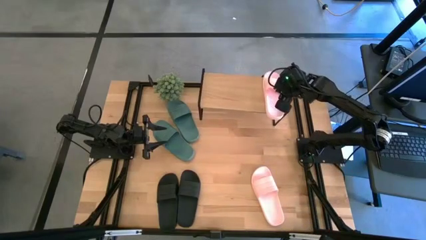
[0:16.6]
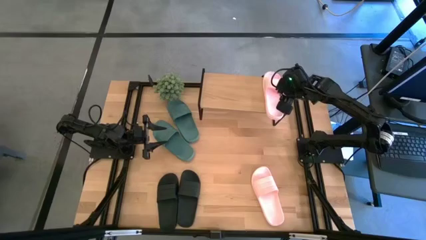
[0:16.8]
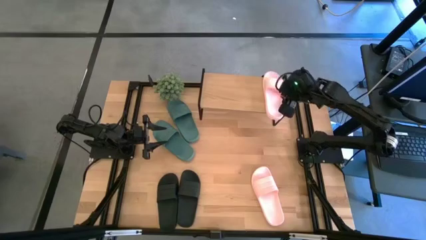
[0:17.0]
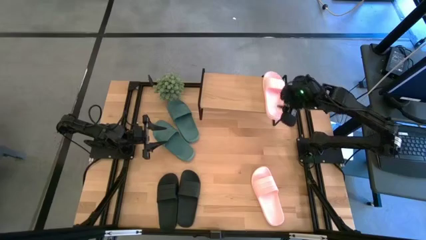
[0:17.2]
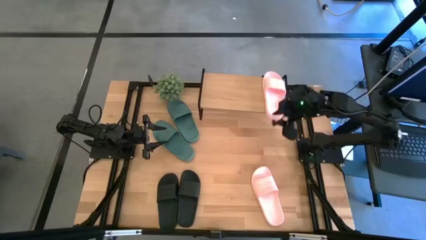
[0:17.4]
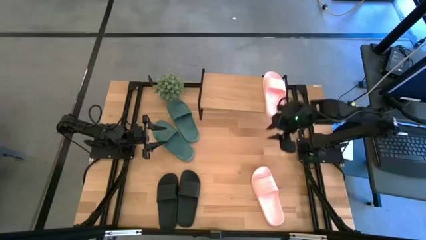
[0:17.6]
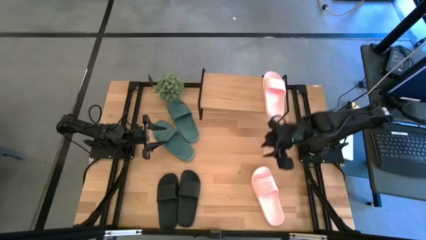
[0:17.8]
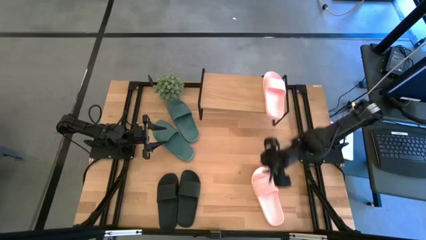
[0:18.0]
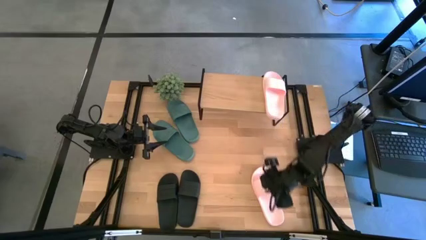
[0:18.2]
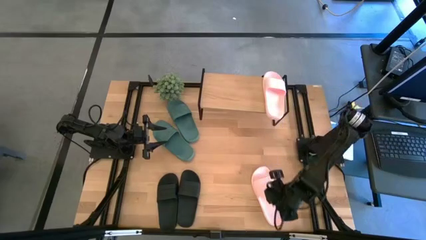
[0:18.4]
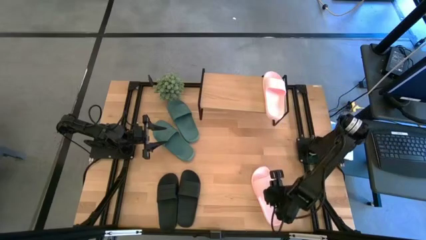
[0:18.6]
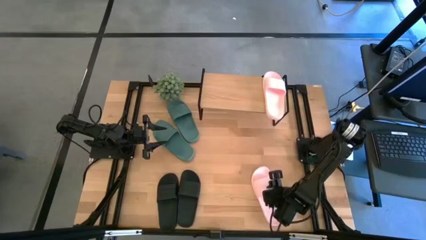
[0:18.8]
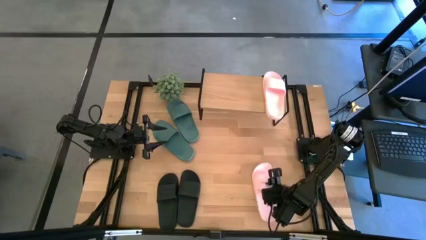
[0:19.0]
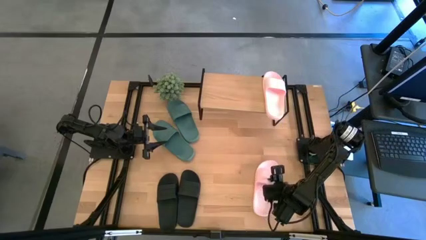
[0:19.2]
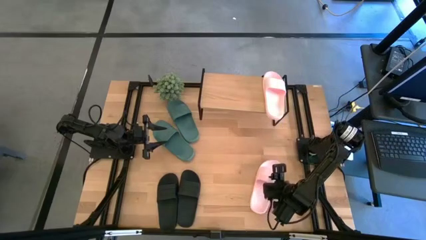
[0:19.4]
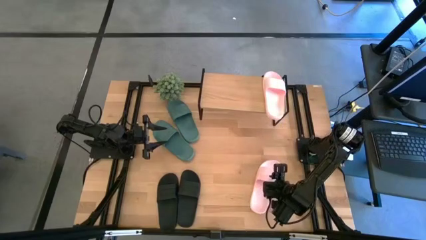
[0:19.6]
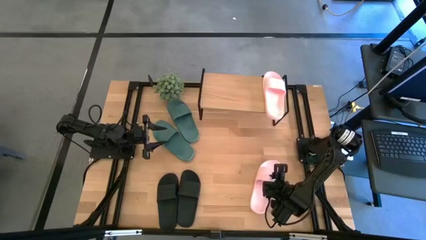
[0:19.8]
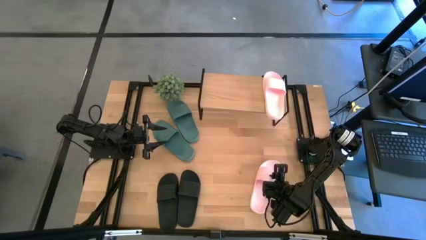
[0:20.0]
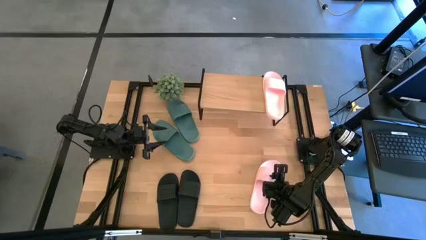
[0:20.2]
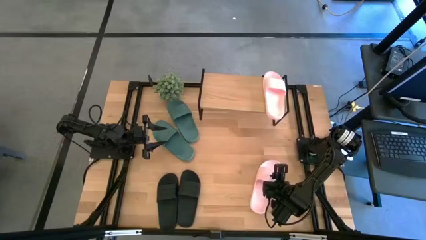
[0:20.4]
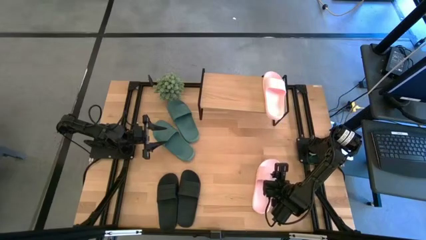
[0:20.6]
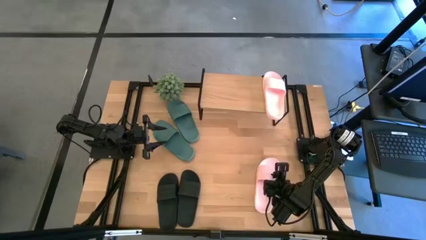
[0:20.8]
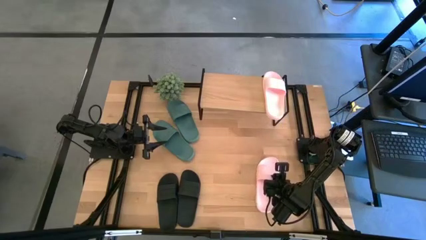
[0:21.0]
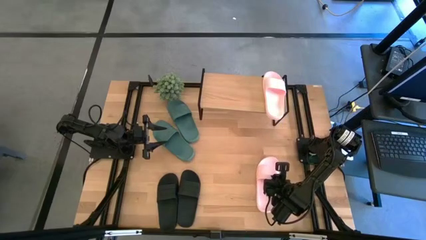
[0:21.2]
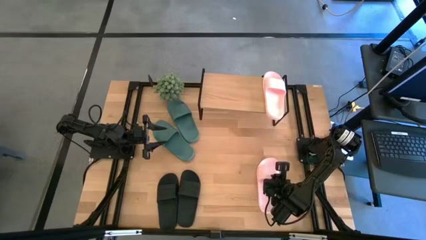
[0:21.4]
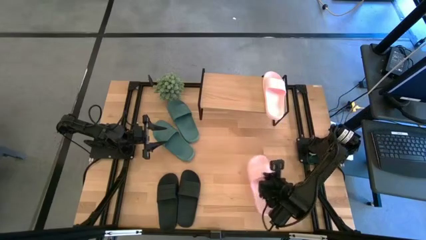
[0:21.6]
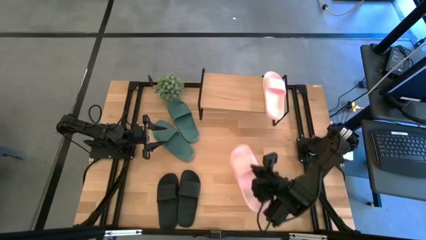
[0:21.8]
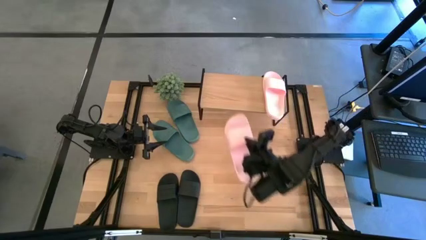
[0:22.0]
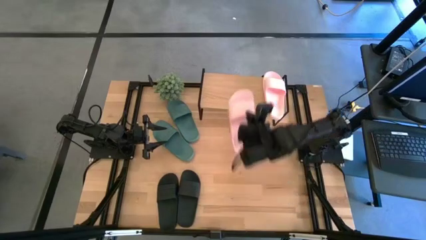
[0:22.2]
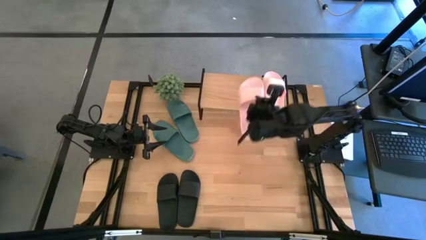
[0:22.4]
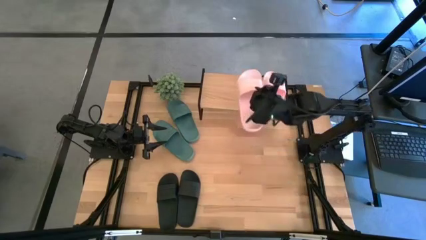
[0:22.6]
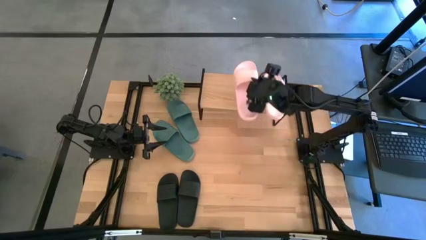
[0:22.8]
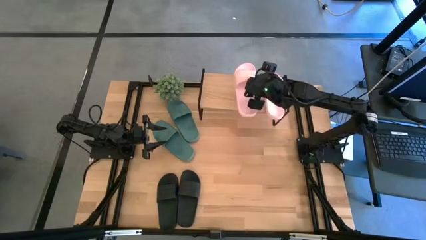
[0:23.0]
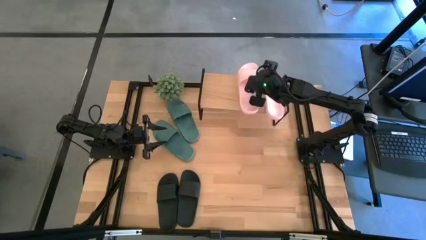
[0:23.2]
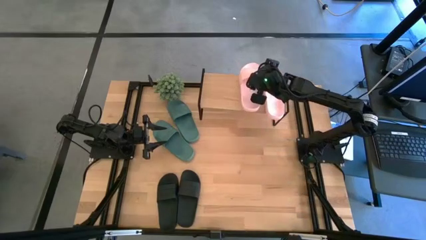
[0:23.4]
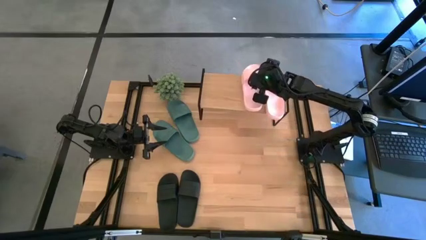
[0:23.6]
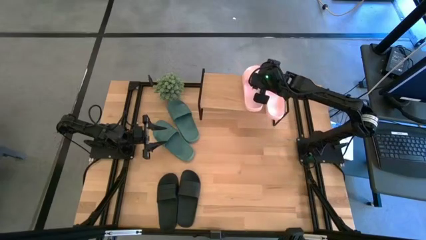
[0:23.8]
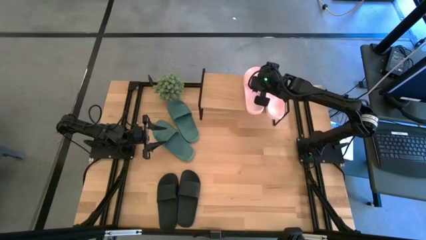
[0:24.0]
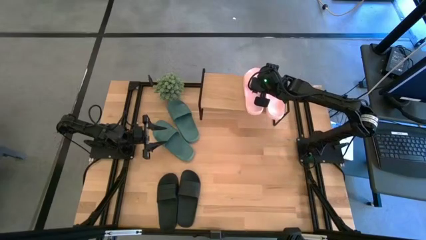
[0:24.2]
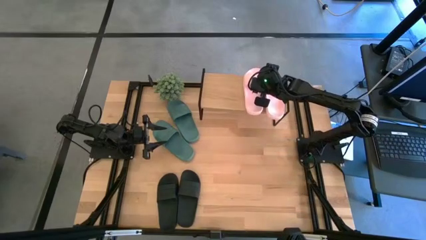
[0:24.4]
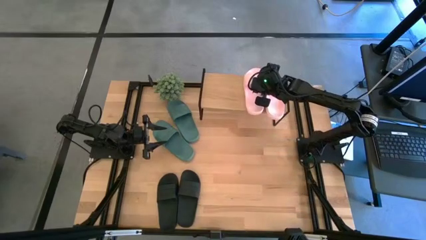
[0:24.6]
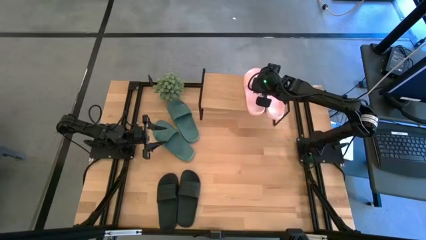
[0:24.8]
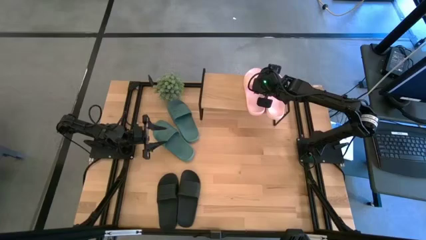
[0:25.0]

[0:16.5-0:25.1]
Task: Pick and place slides into the shelf
Put the pink slide on the shelf

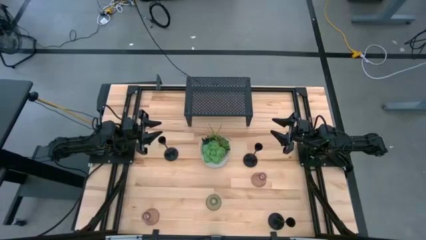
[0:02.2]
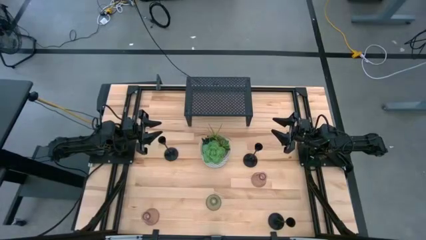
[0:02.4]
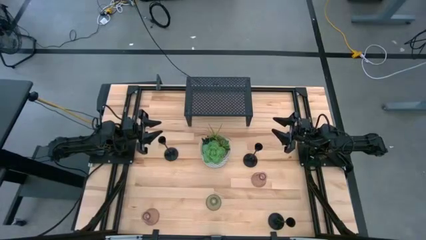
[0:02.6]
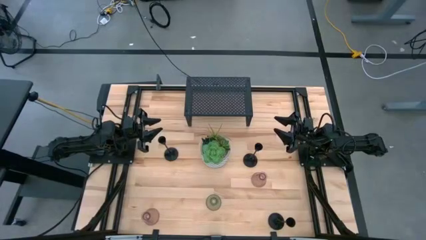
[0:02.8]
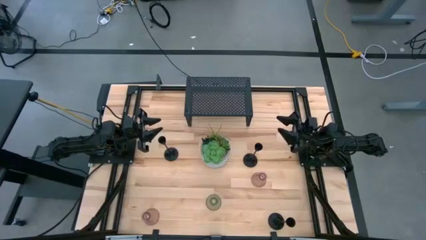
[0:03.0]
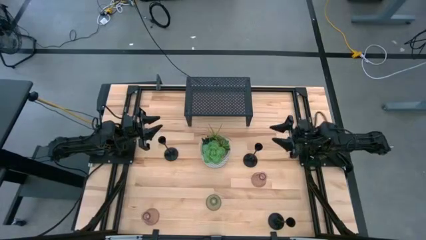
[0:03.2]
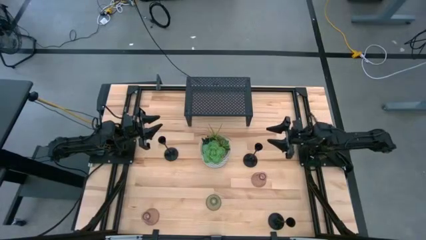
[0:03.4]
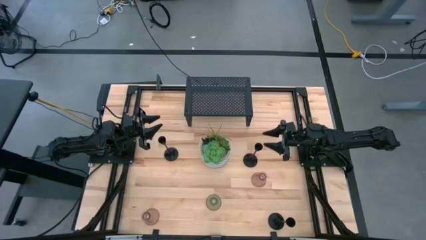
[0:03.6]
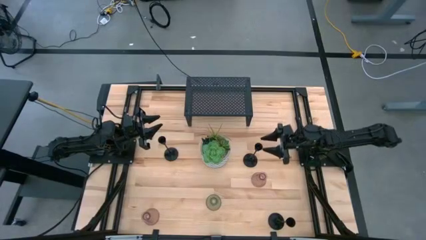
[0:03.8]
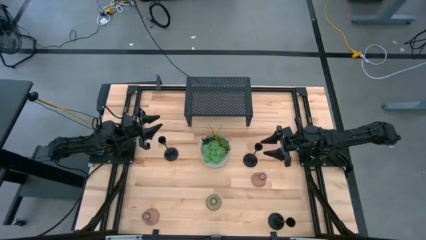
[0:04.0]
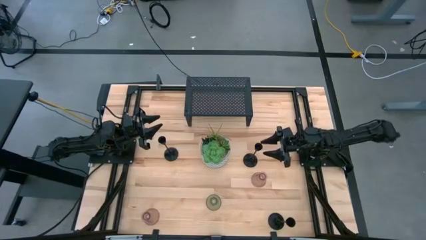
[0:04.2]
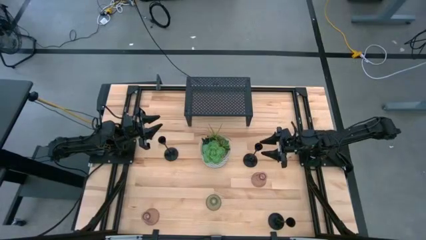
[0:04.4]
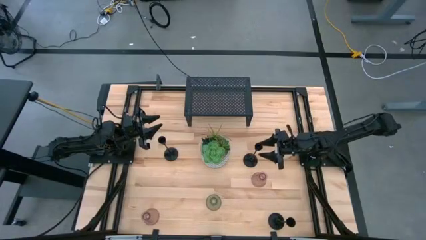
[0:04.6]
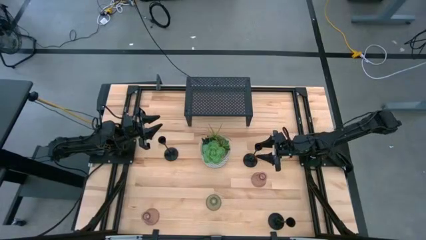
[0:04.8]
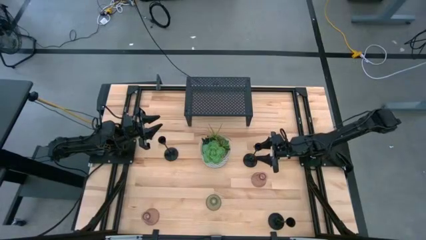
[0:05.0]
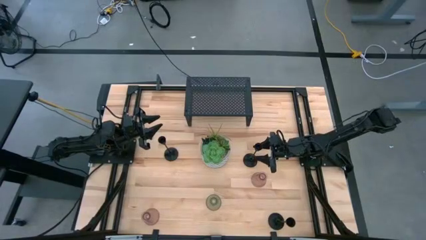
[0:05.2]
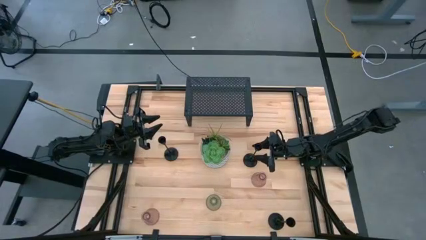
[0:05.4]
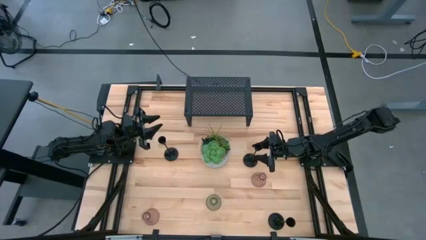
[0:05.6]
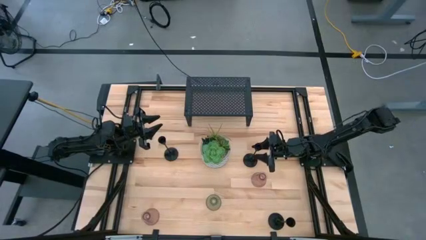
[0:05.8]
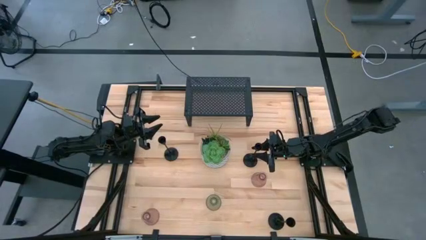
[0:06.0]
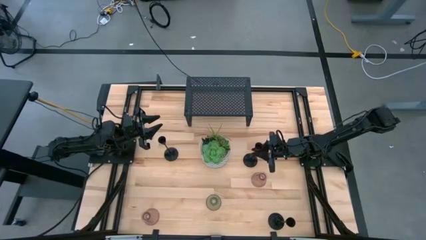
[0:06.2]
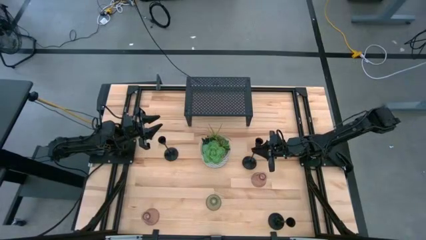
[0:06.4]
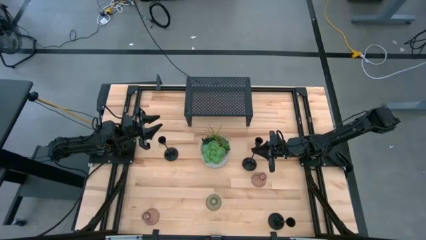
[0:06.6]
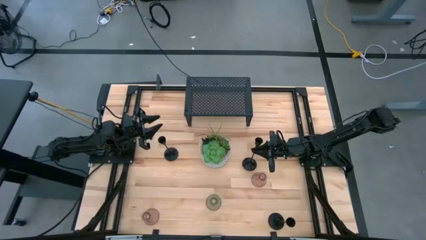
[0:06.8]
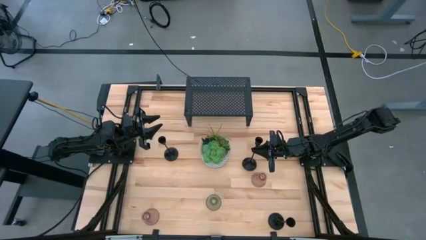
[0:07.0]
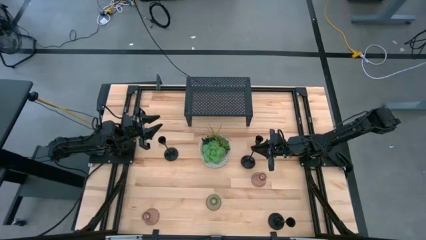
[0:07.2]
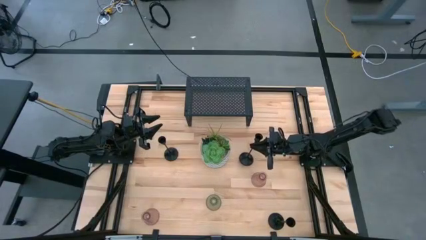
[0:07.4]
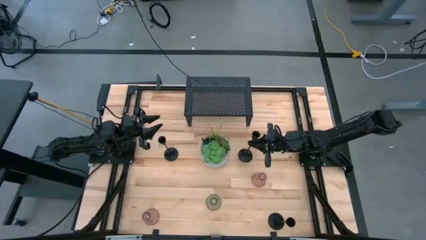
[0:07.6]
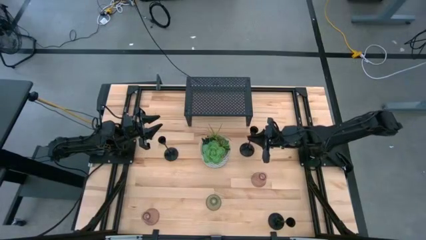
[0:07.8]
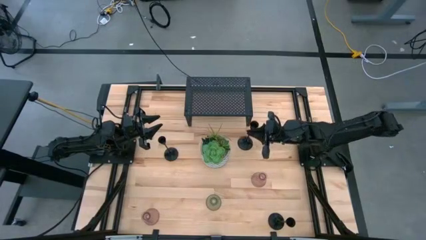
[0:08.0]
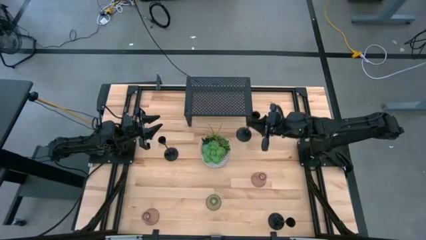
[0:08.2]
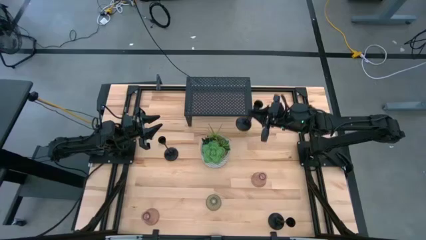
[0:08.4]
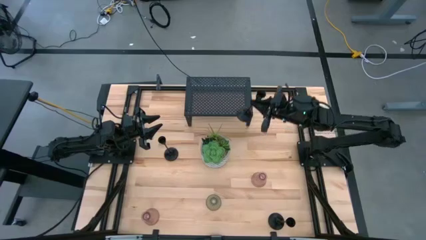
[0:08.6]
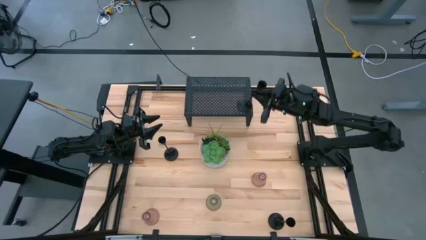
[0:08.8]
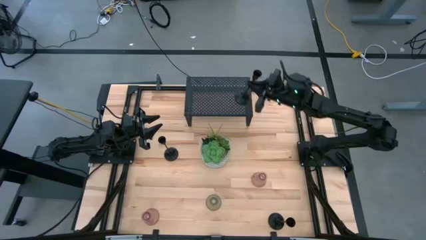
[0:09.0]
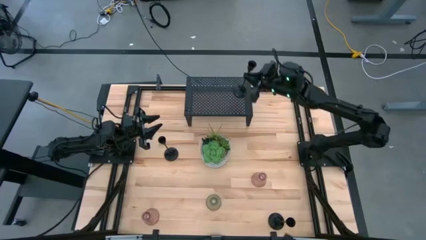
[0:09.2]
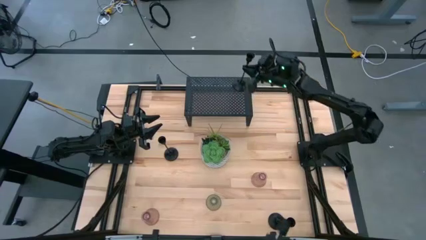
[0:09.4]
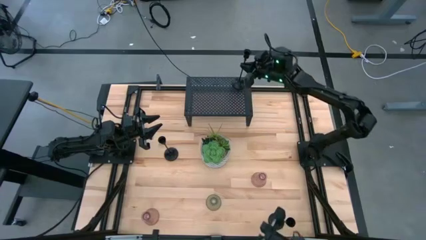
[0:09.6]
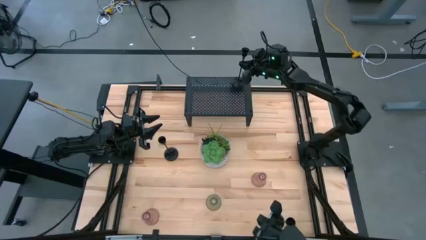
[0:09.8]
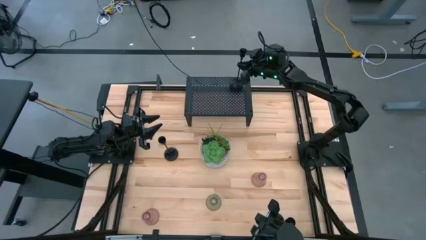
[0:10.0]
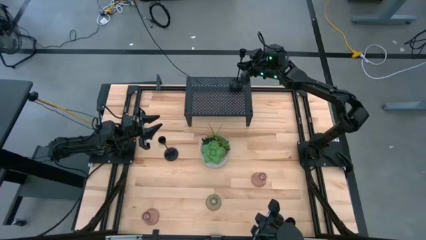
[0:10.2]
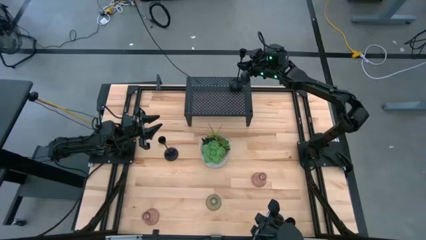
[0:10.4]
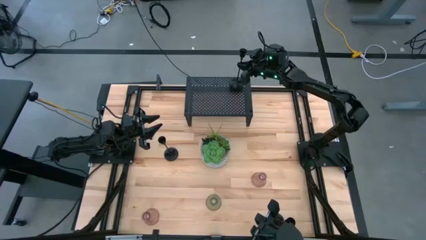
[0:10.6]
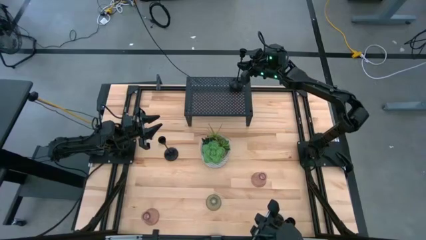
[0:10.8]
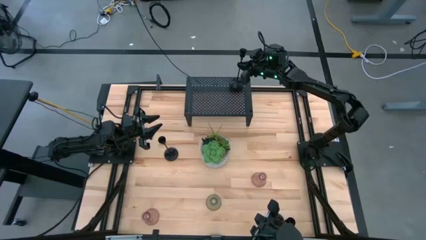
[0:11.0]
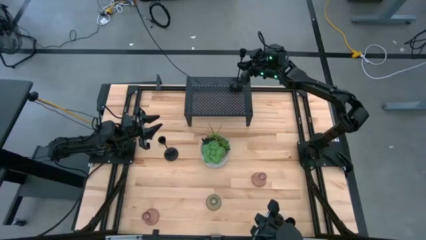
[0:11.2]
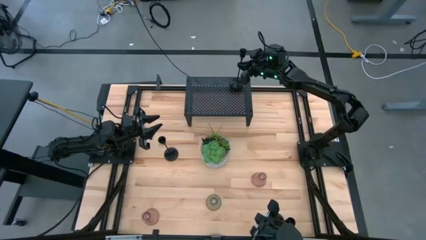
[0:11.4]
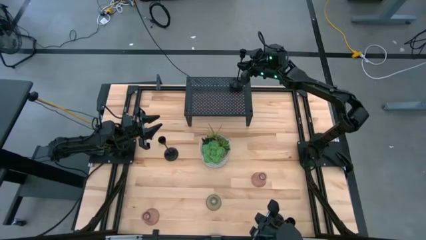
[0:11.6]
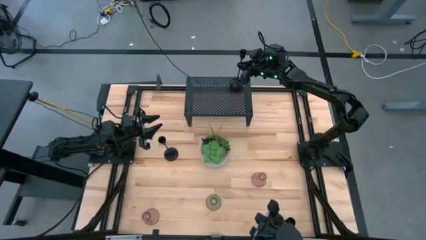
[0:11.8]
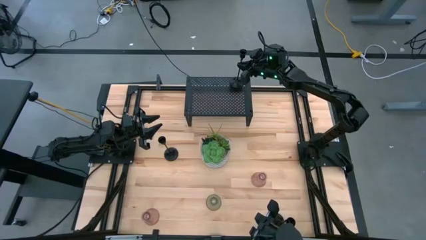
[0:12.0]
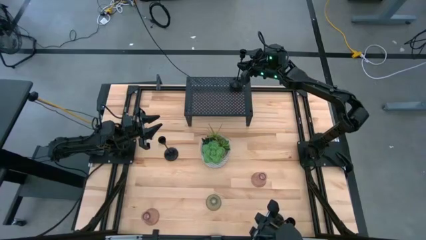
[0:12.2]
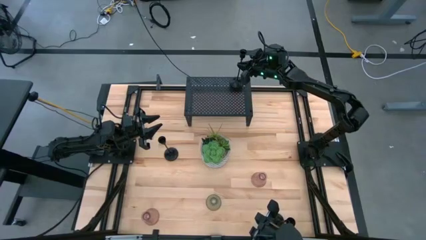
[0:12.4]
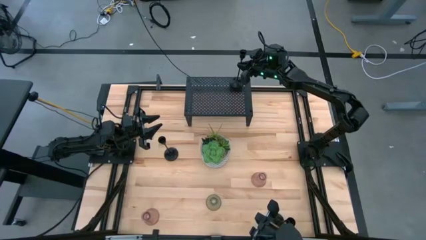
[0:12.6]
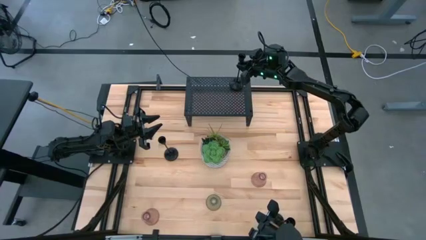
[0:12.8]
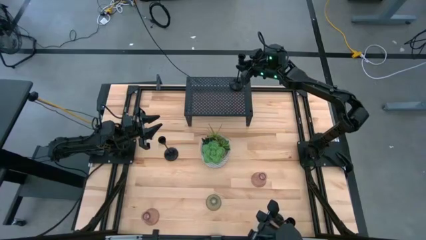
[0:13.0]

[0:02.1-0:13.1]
Task: Pick & Place candle stick holders
Put the top right black candle holder on the shelf
